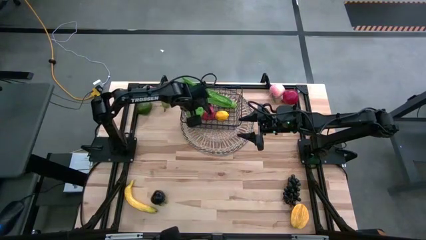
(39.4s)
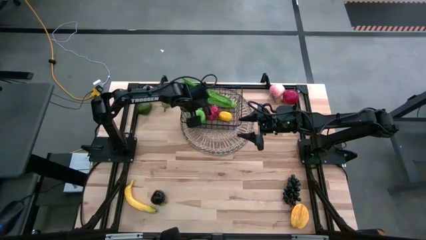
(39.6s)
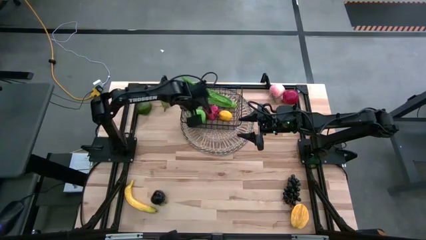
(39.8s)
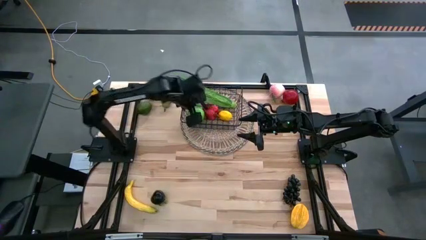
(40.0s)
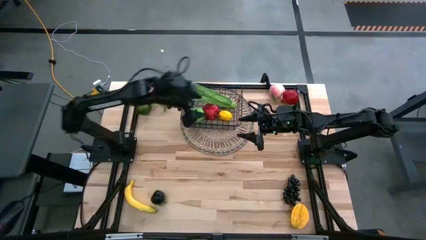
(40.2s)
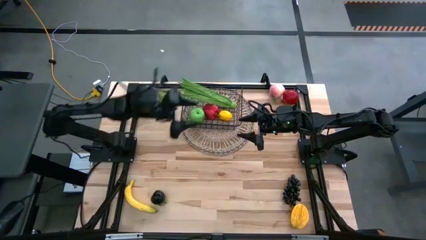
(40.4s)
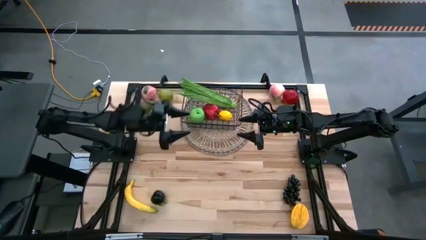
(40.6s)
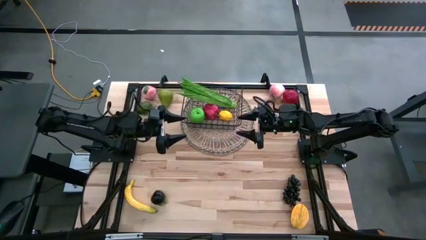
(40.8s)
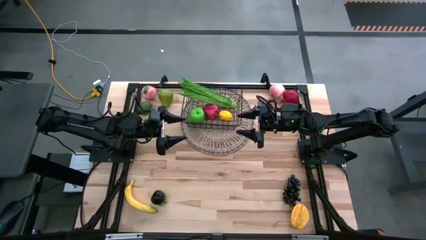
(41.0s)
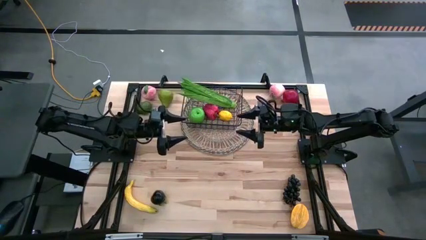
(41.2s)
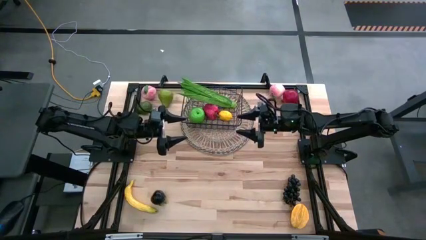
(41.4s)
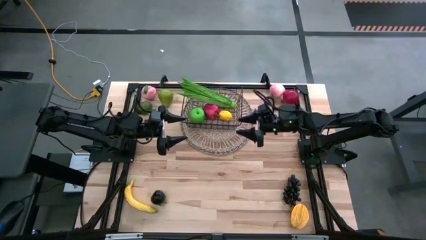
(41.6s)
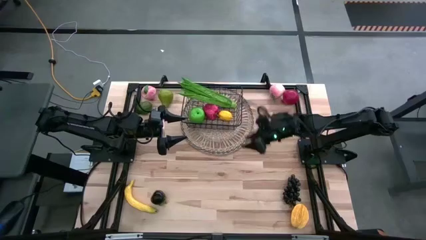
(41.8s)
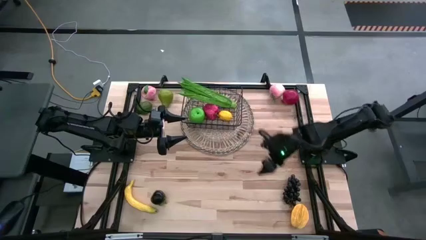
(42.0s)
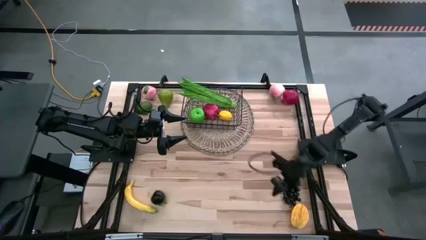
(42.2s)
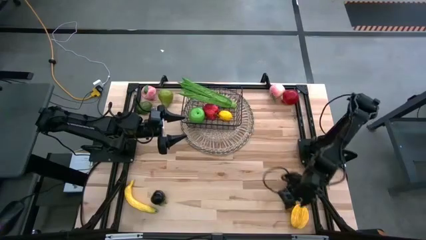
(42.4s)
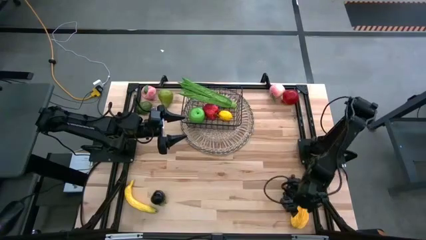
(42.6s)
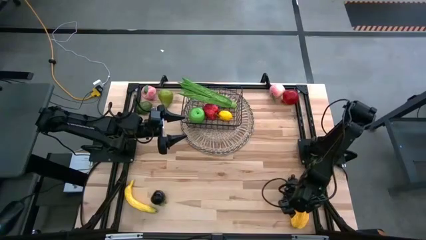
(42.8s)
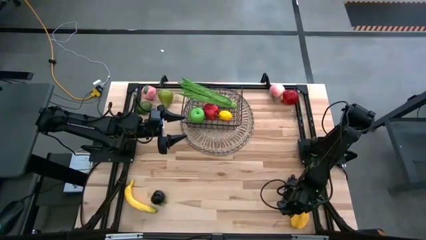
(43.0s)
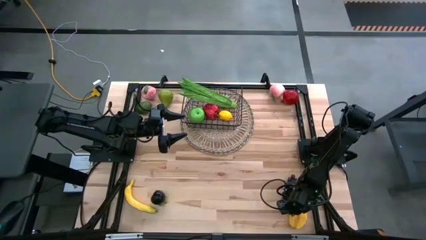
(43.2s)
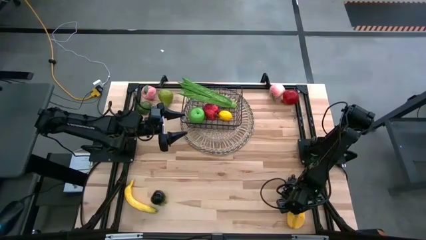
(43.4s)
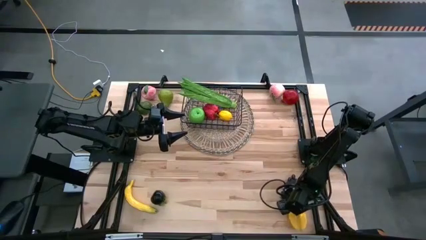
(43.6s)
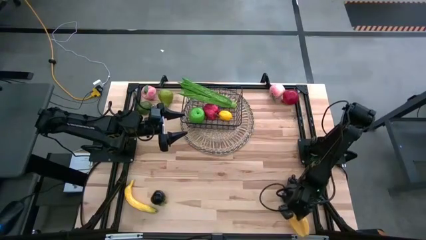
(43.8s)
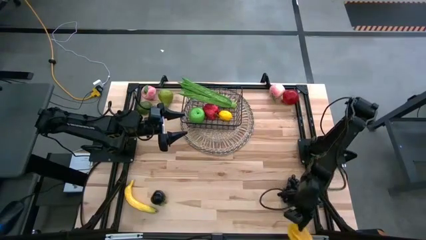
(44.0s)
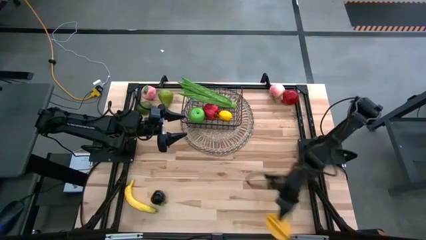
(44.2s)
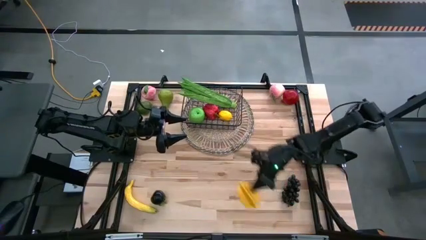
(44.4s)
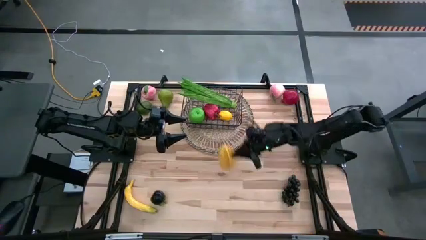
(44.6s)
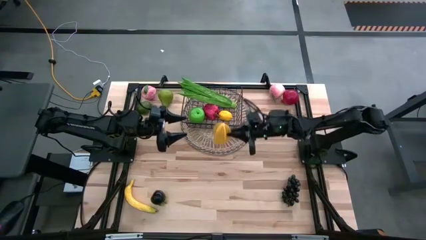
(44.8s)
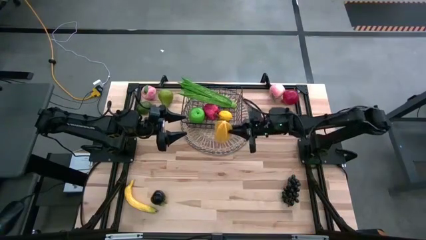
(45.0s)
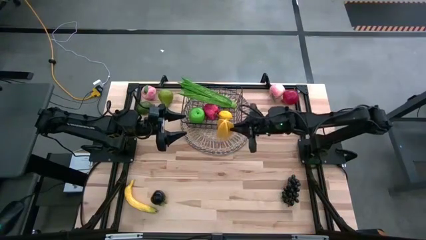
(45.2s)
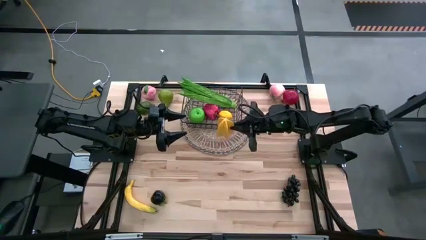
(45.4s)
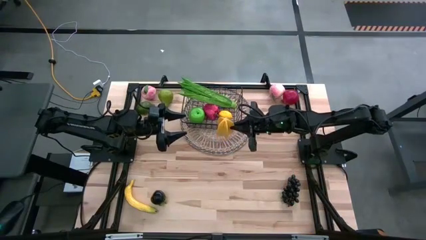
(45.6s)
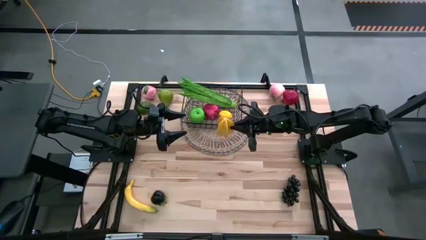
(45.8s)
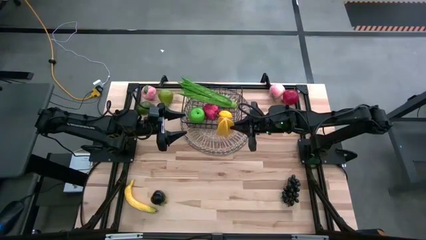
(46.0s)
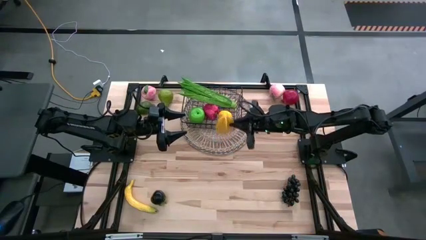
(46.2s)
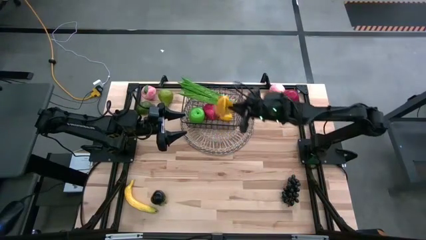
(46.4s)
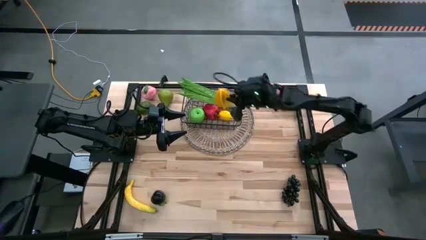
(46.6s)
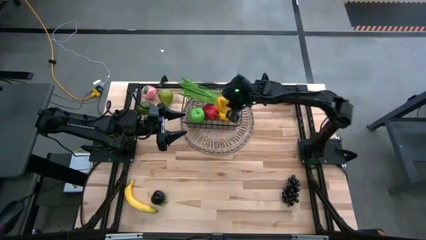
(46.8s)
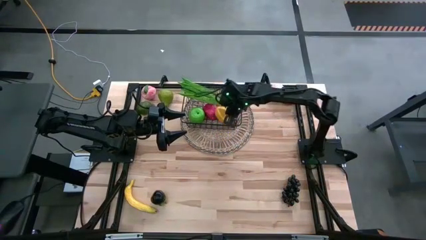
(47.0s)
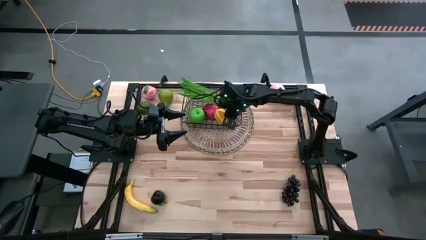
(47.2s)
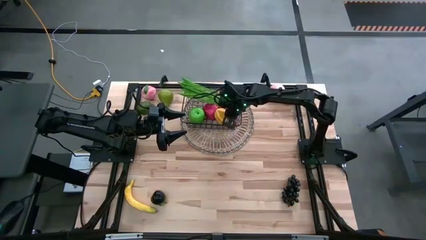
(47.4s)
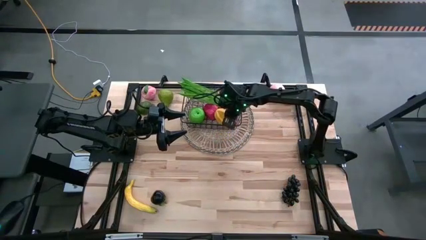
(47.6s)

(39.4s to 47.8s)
Task: Build produce basket
Put the starfruit into the black wire basket

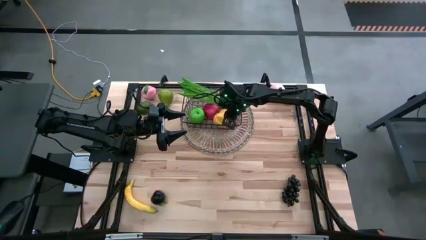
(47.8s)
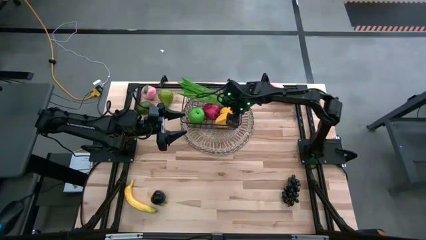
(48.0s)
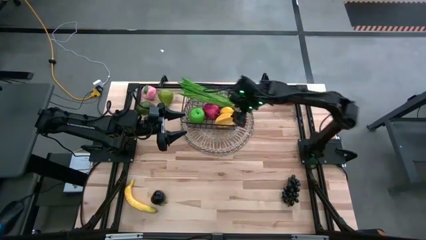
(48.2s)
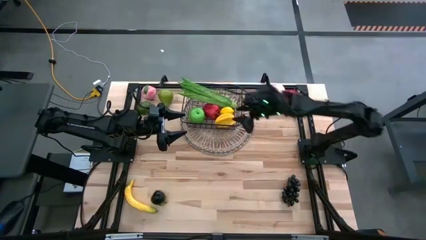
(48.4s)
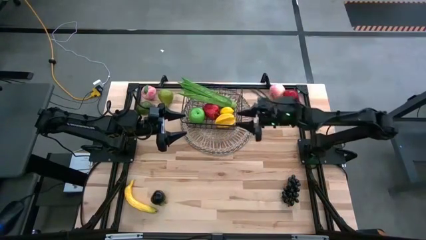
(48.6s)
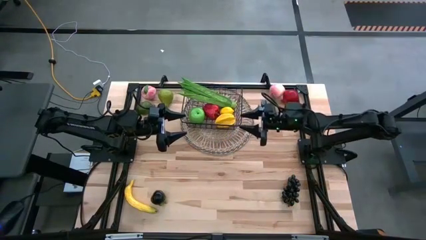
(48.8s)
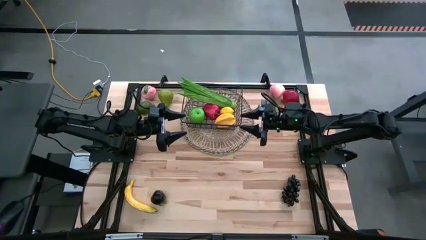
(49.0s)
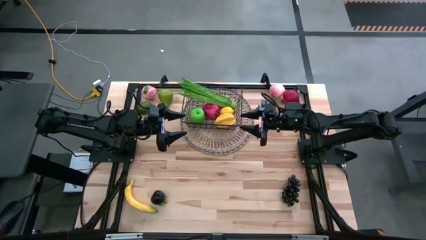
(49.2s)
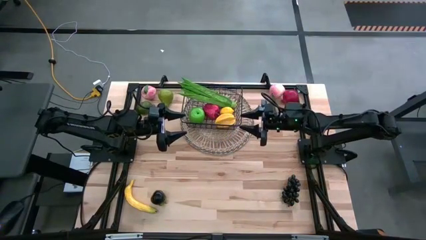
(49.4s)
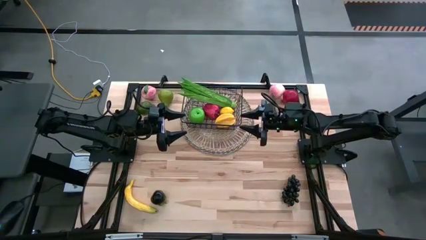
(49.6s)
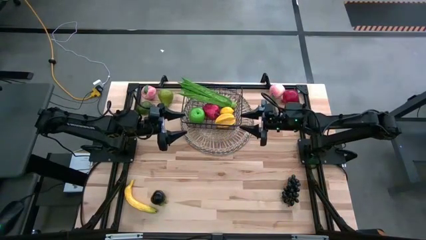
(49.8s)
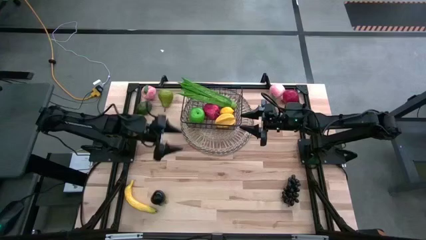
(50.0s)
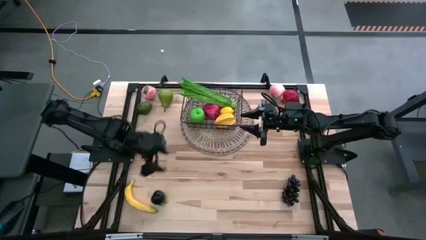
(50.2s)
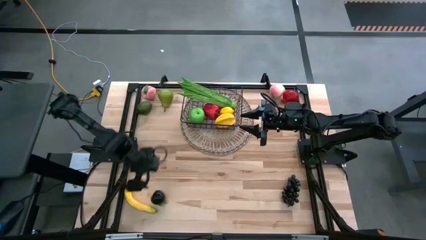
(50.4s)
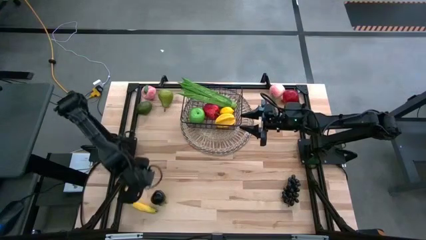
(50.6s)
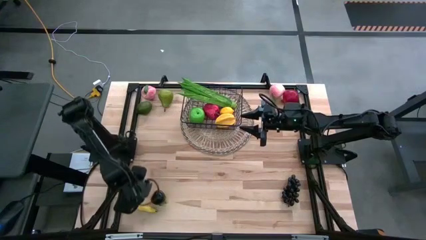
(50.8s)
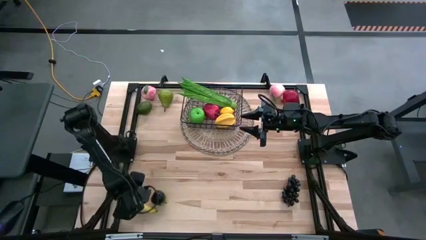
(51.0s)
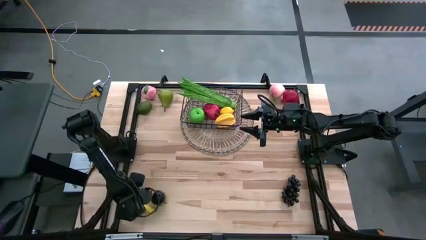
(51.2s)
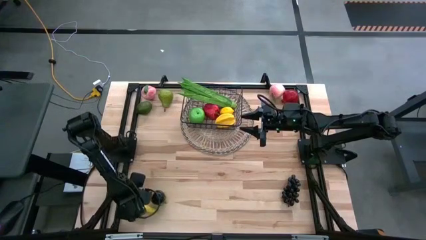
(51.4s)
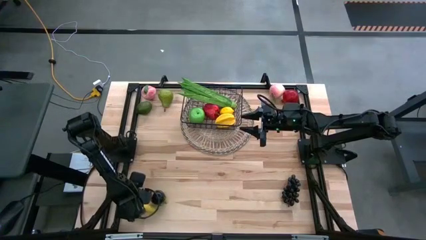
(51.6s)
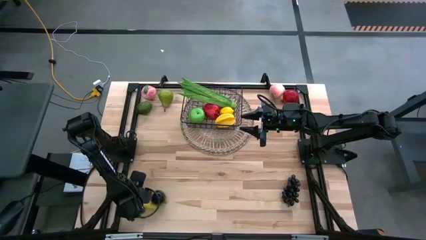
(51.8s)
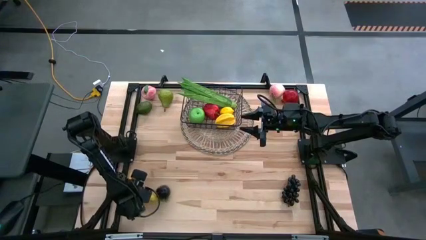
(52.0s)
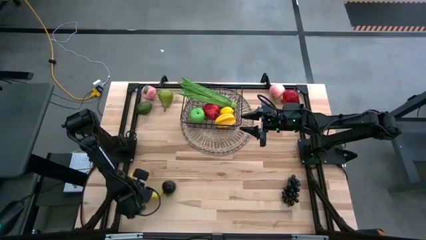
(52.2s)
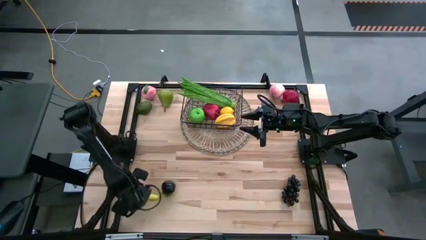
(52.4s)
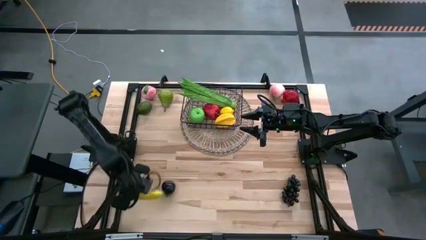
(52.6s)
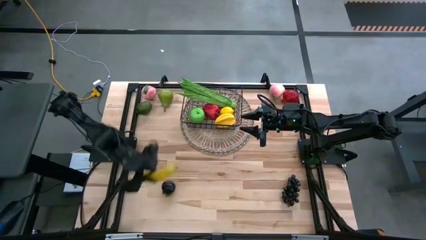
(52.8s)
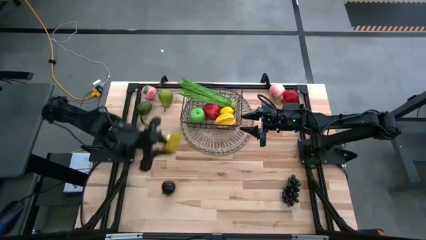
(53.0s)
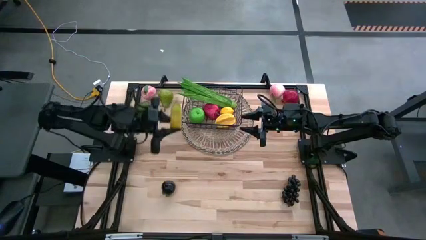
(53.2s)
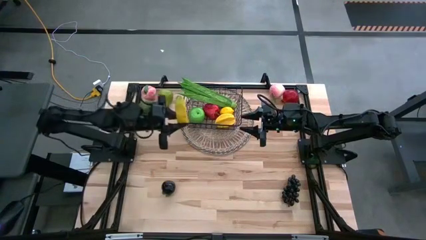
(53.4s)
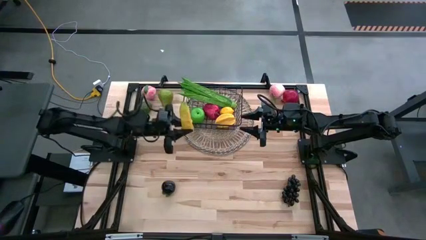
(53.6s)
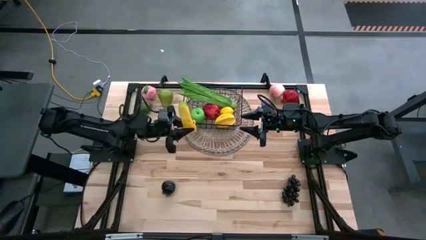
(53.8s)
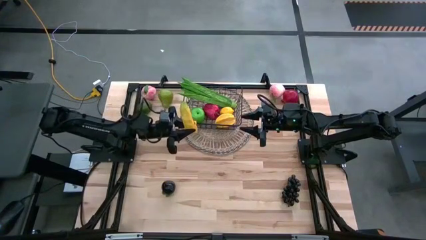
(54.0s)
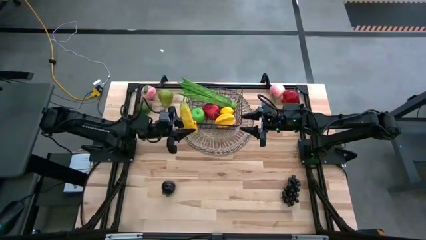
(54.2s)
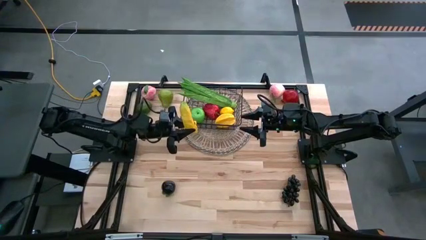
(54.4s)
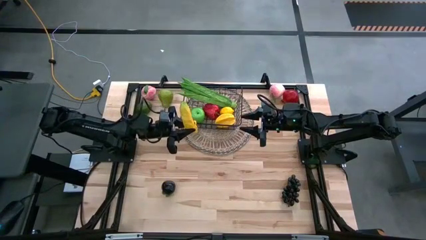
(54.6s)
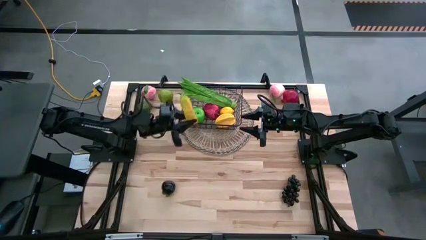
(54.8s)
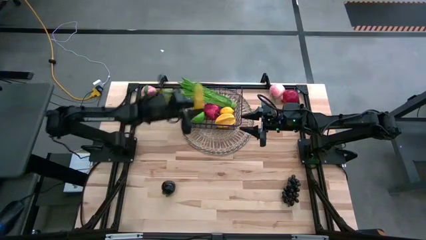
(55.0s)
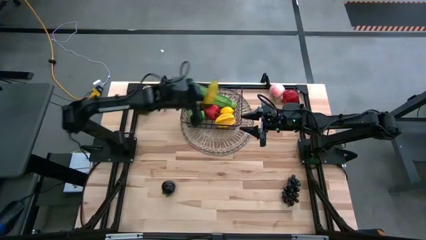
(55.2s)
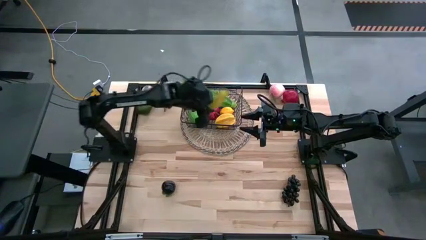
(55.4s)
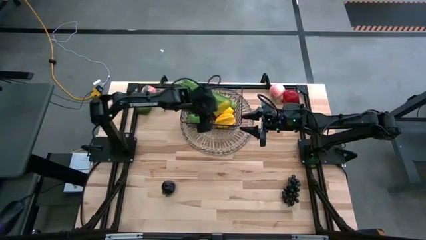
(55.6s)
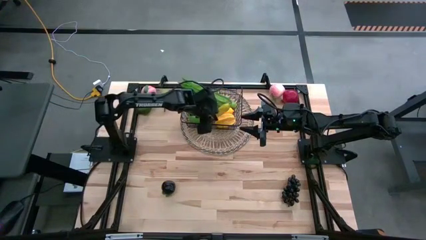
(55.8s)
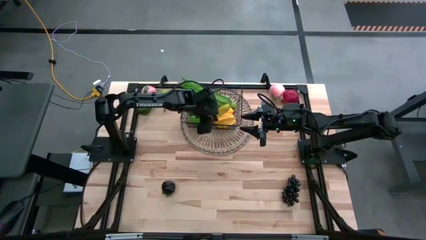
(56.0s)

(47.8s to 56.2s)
Put the banana into the black wire basket
